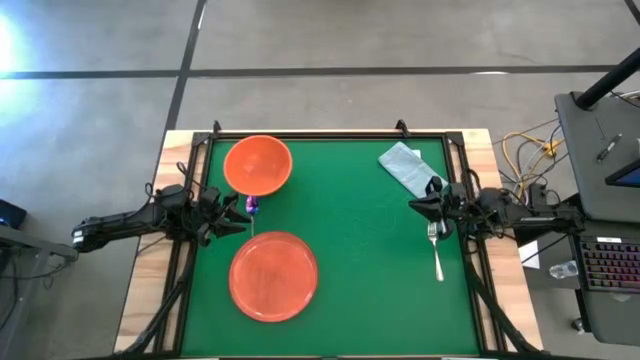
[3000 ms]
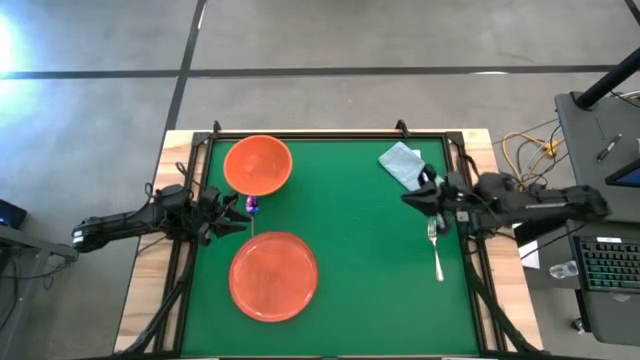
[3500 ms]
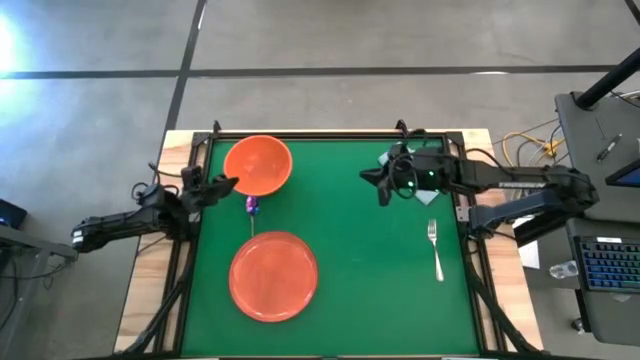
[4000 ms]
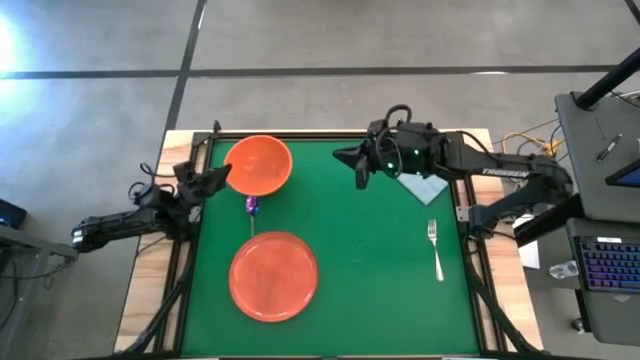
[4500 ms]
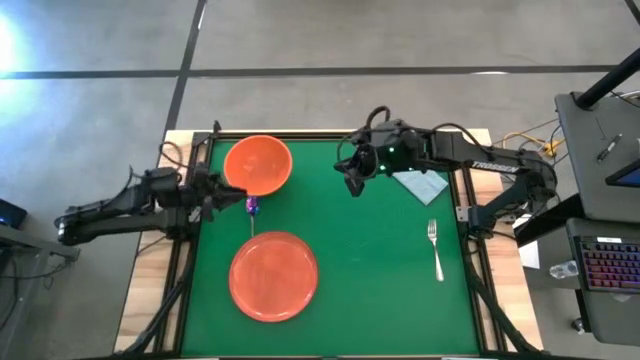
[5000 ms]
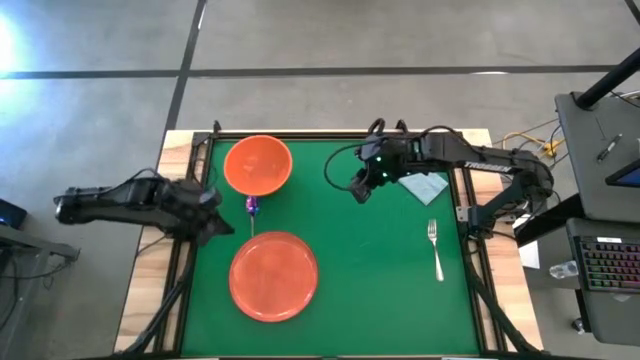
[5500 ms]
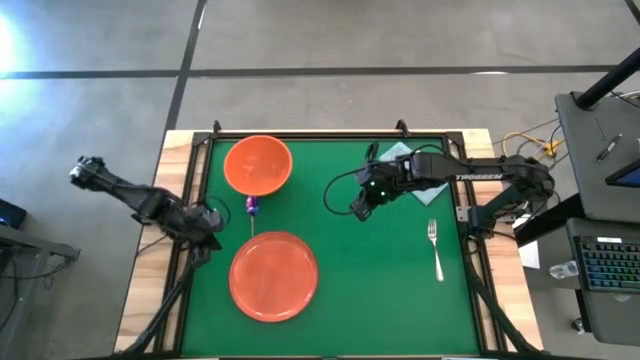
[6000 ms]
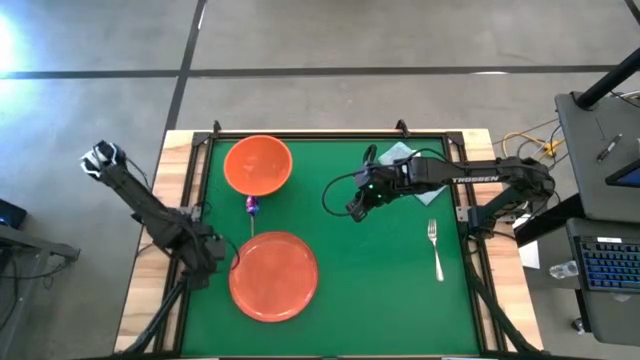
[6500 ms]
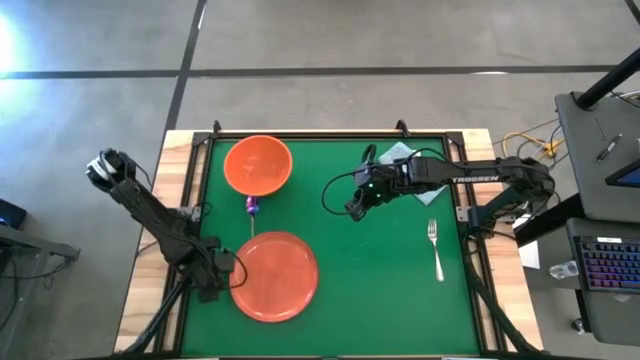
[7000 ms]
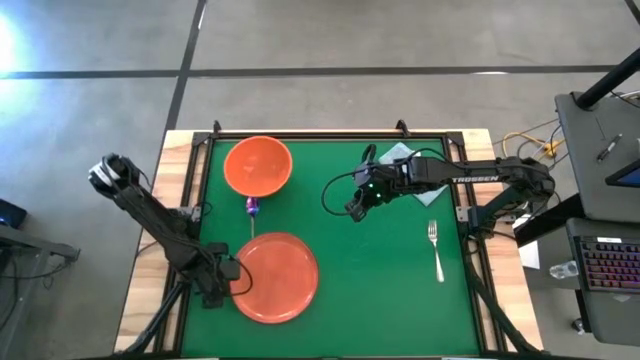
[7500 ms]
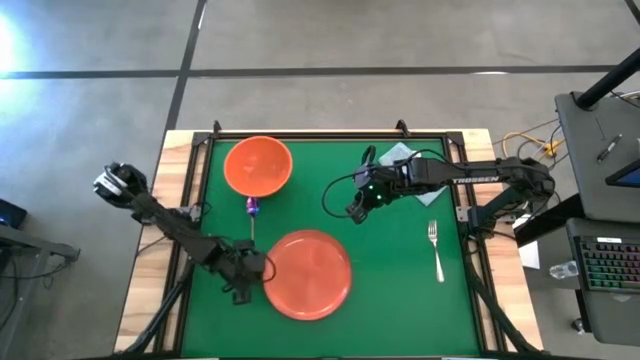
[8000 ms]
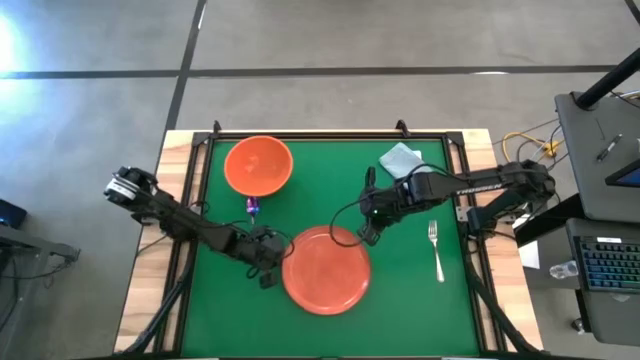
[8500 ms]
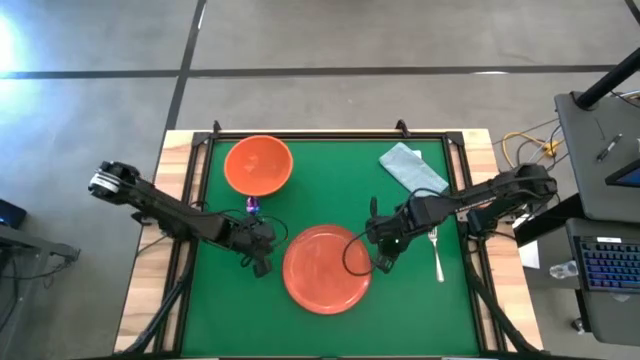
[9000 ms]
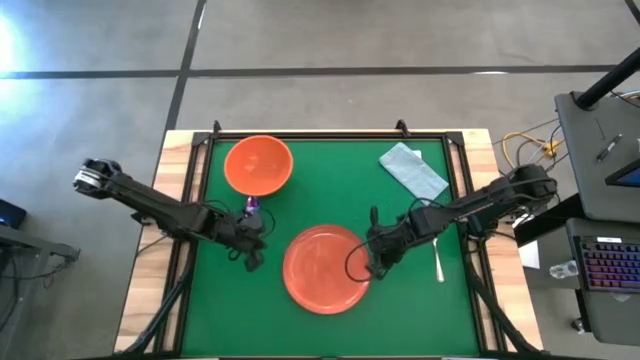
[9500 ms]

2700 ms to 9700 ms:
Task: Set table place
Move the orange plate to the center of the table

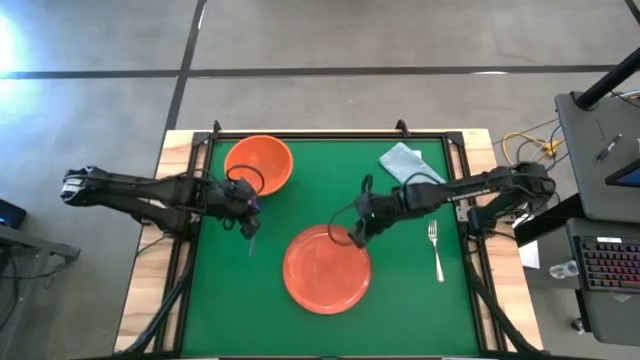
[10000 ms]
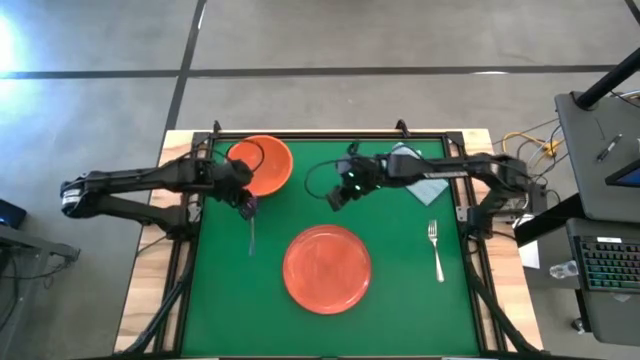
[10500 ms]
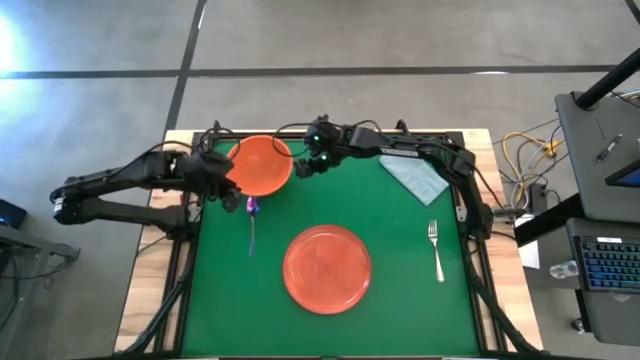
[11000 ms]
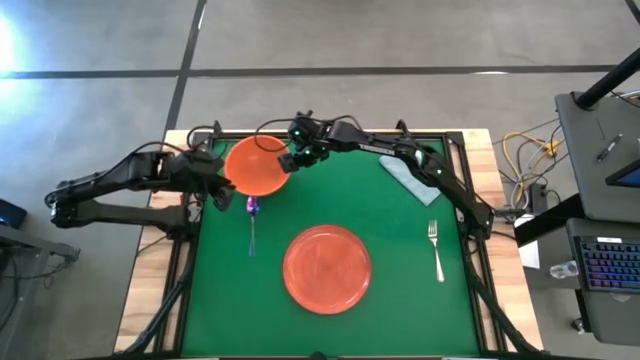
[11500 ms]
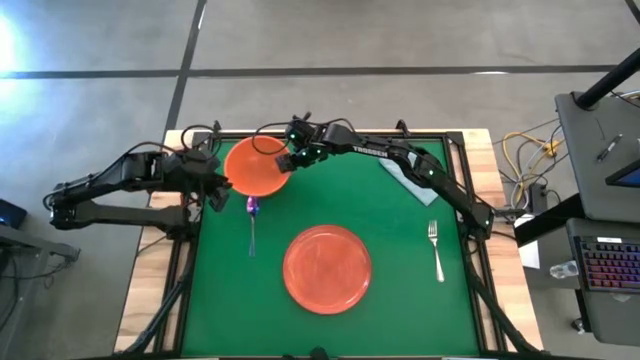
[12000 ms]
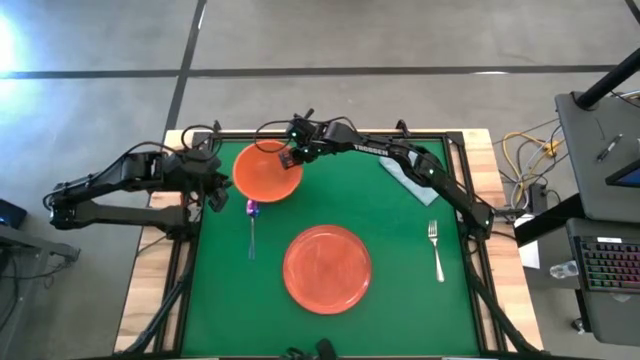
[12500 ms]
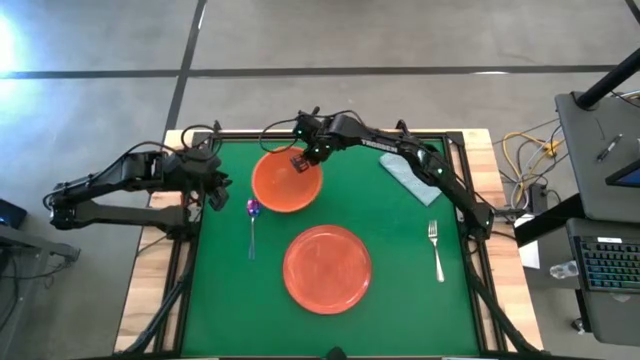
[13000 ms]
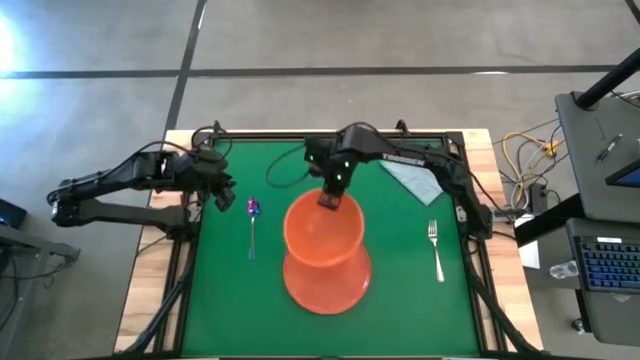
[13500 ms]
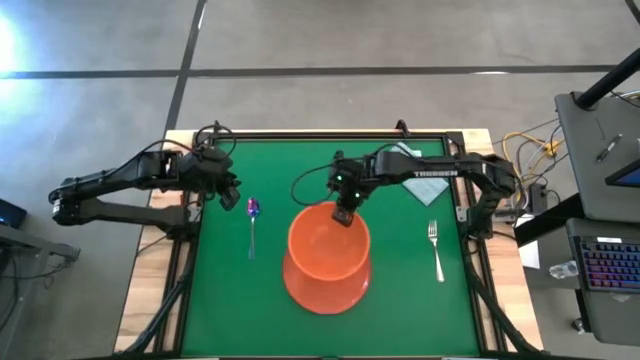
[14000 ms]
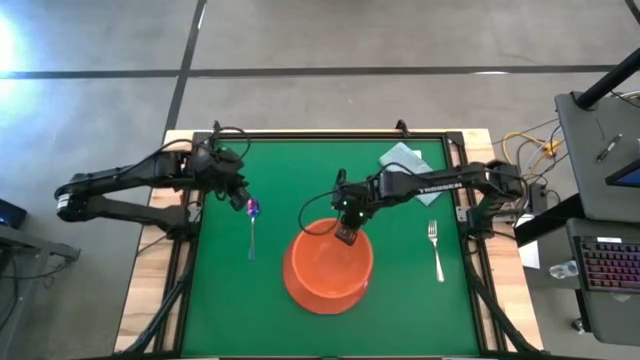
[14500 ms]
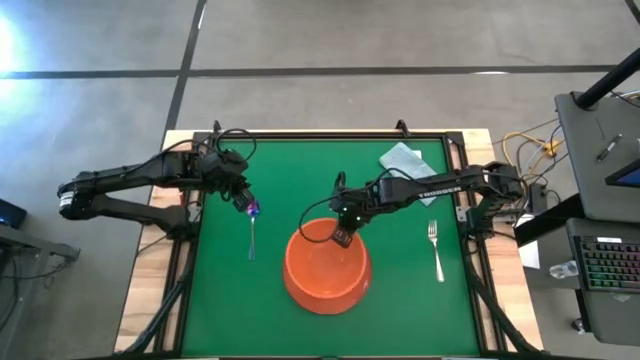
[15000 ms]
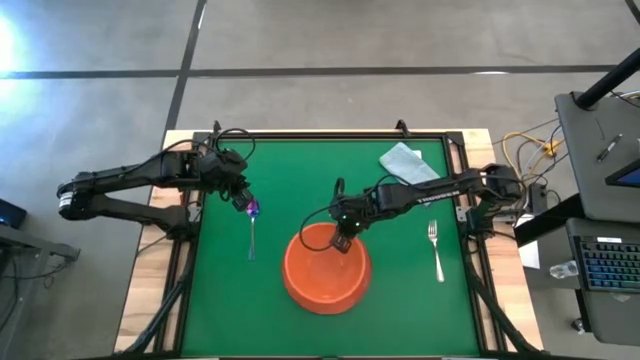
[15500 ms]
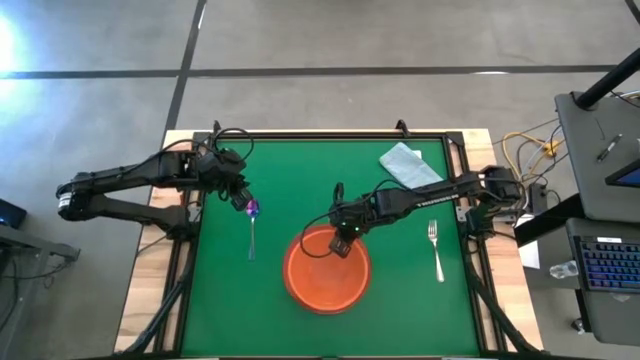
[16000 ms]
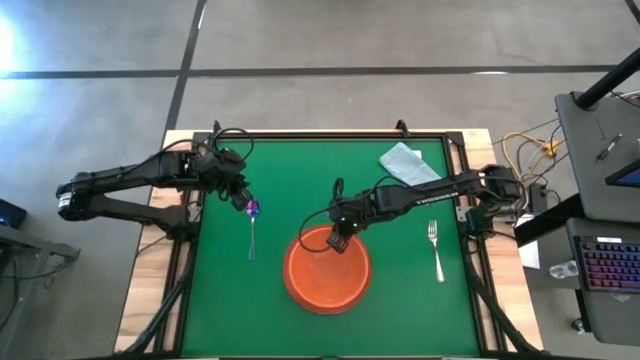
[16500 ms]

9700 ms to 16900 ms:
Put the orange bowl on the orange plate

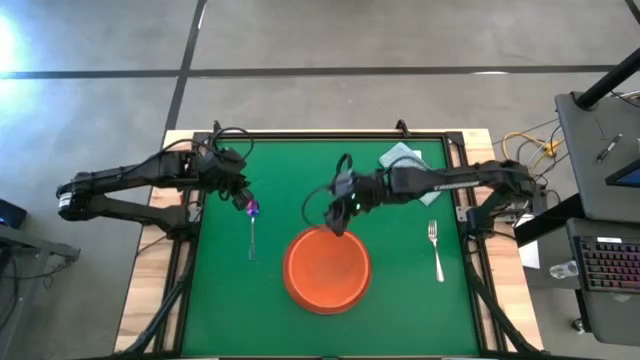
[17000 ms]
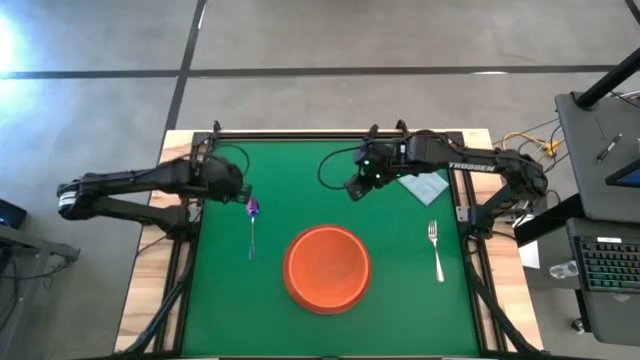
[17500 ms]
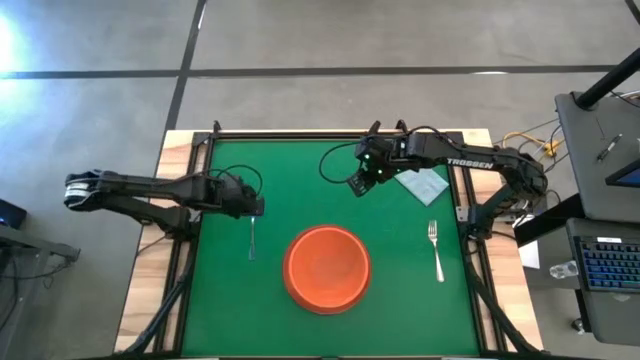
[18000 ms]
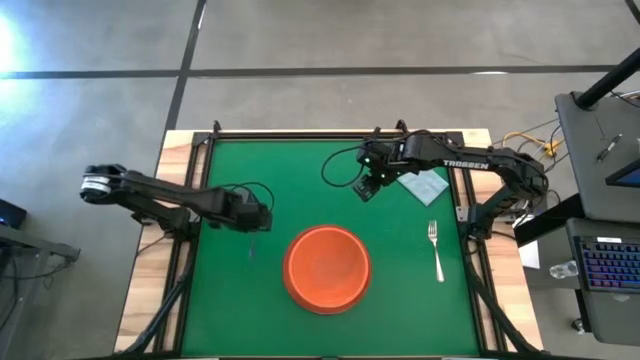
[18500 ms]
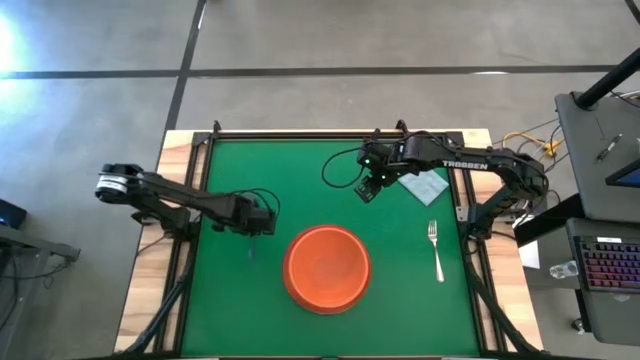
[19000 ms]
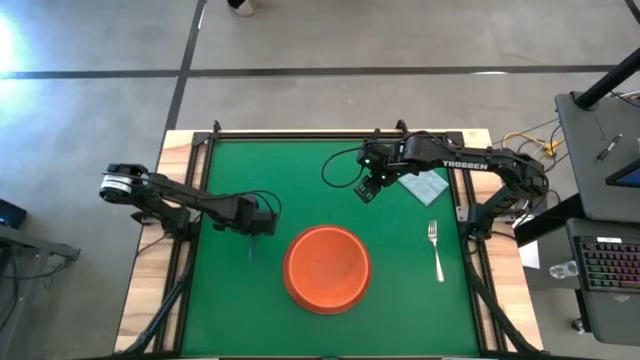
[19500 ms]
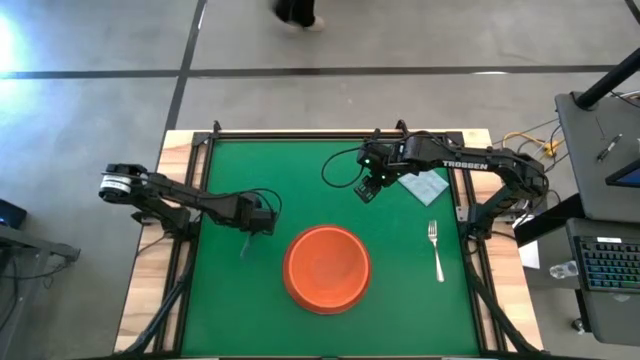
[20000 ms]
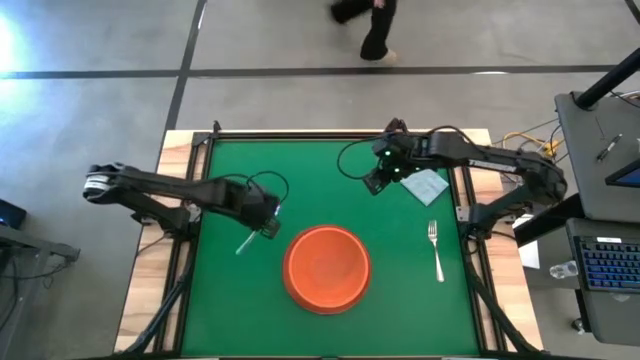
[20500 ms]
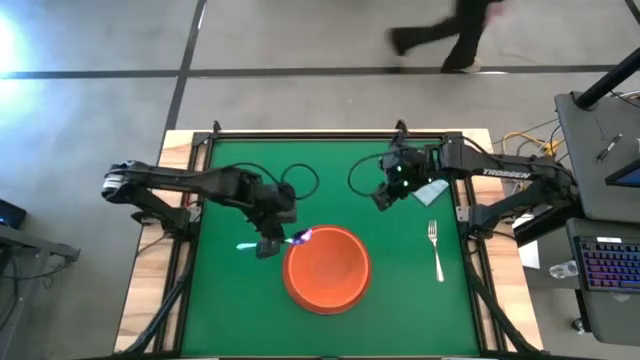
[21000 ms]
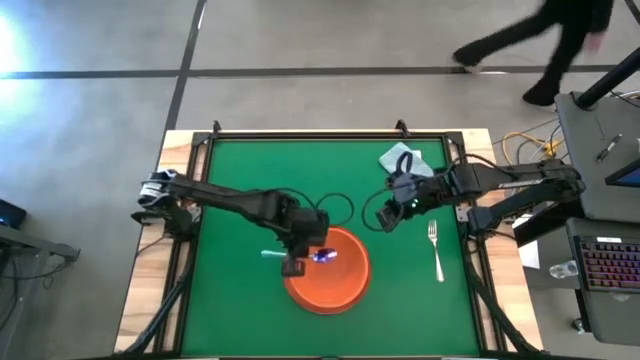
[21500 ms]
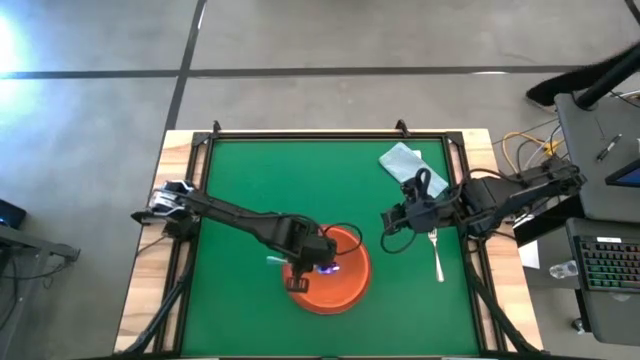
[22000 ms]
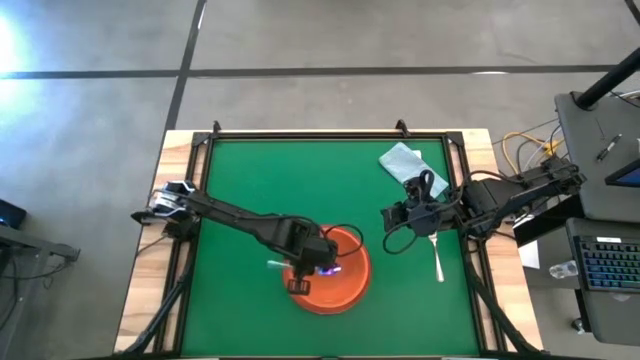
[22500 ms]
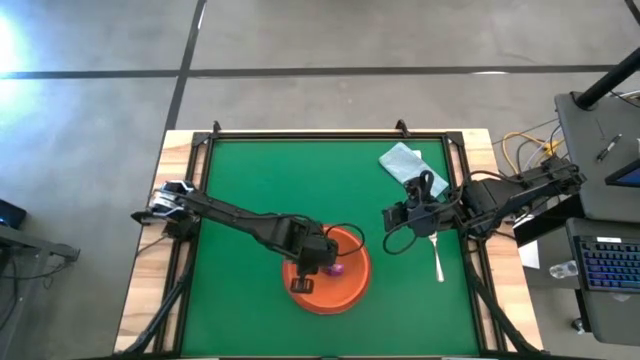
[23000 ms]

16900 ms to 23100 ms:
Put the purple spoon into the orange bowl

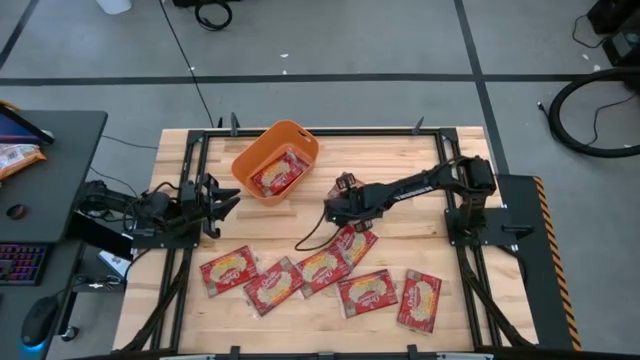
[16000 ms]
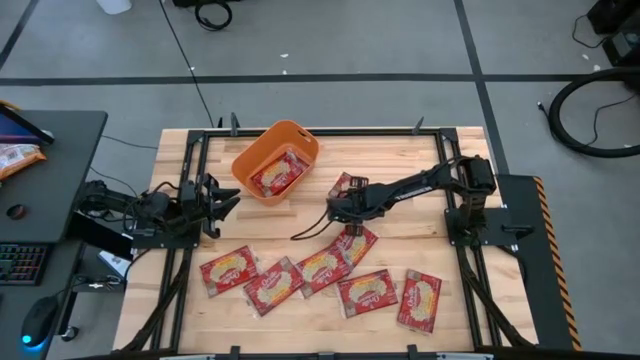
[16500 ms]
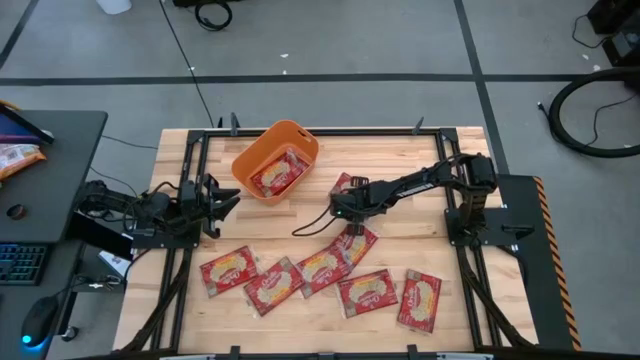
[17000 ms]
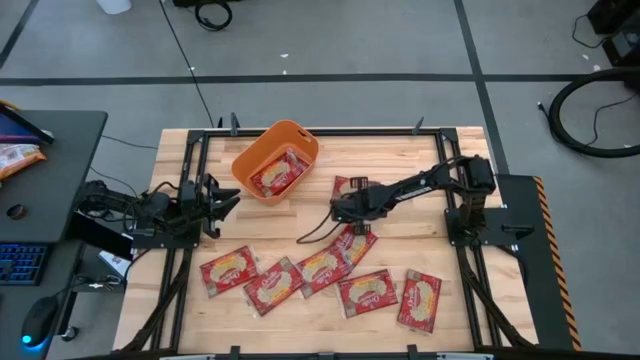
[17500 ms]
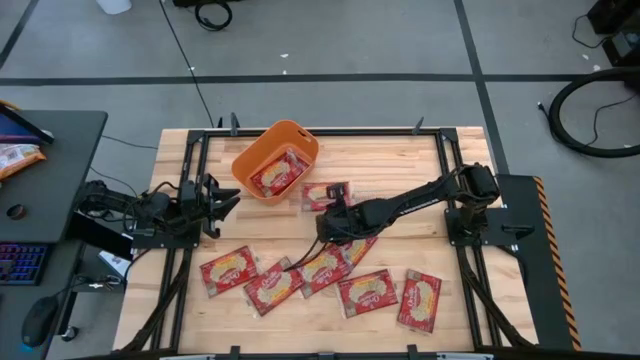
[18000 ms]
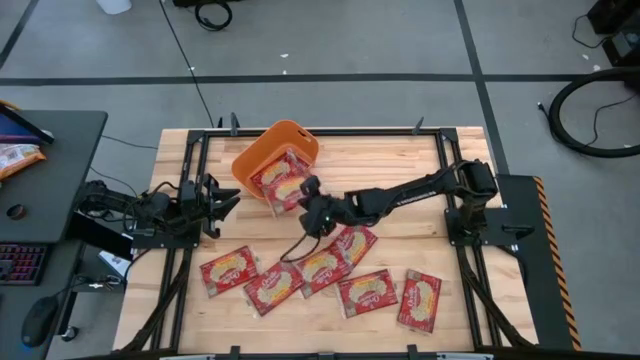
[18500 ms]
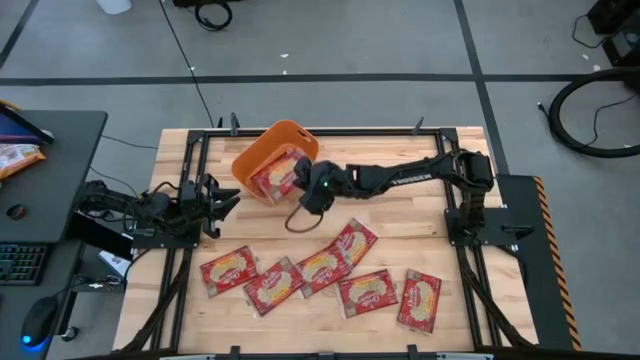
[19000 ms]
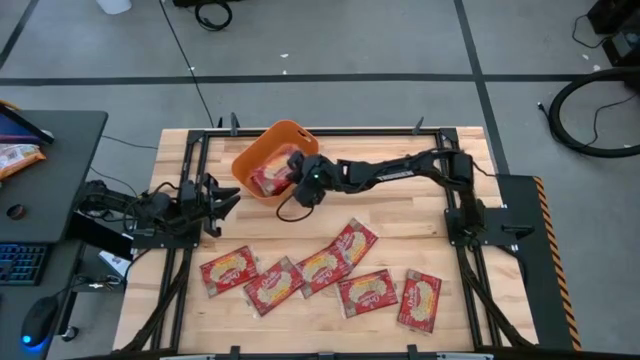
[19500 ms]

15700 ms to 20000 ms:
Task: Sort popcorn bags into baskets
Put the red popcorn bag into the orange bin
